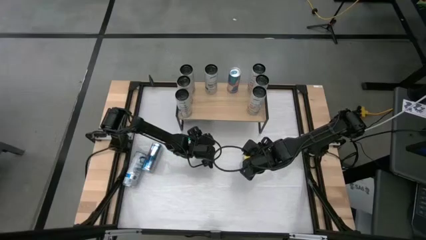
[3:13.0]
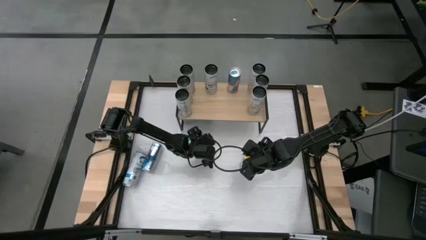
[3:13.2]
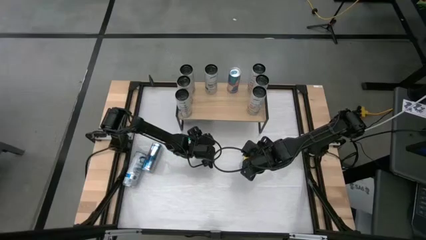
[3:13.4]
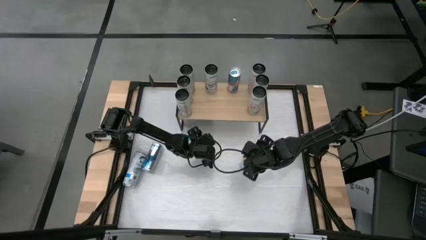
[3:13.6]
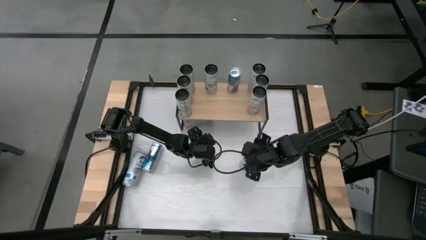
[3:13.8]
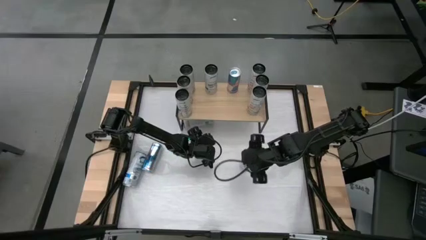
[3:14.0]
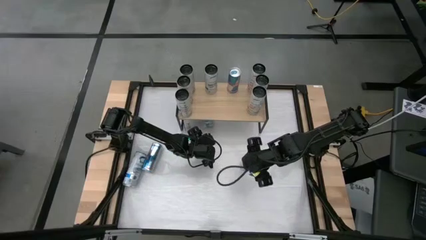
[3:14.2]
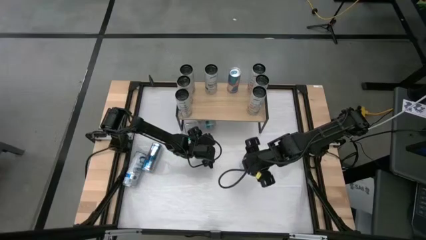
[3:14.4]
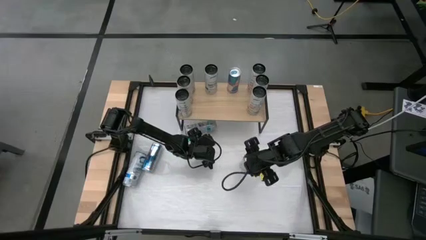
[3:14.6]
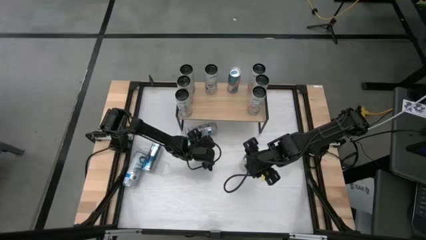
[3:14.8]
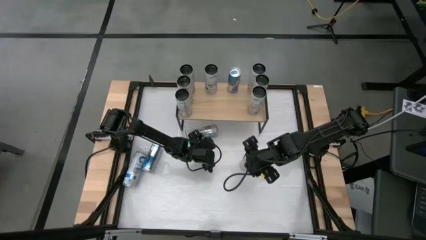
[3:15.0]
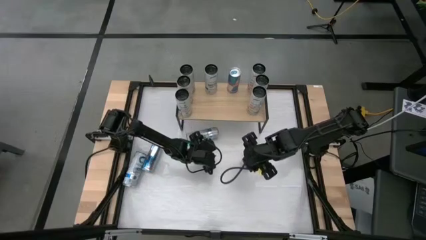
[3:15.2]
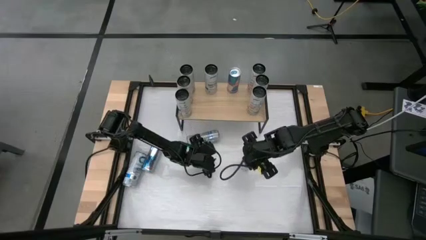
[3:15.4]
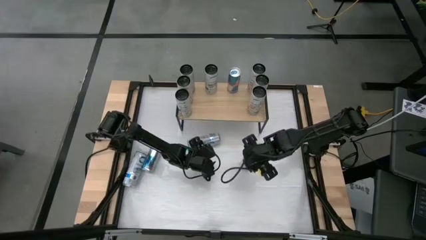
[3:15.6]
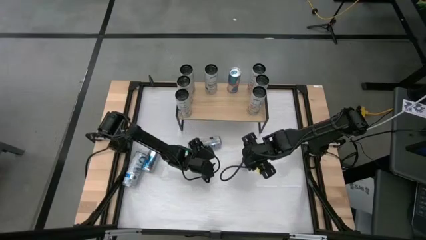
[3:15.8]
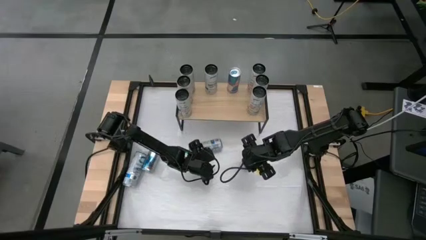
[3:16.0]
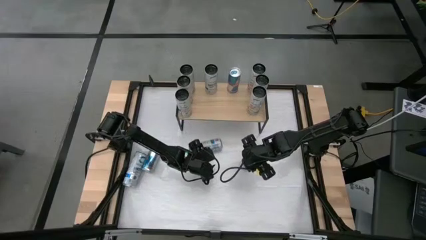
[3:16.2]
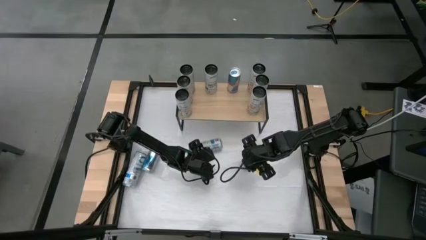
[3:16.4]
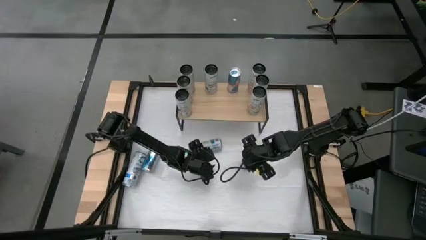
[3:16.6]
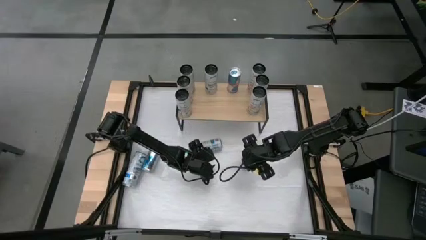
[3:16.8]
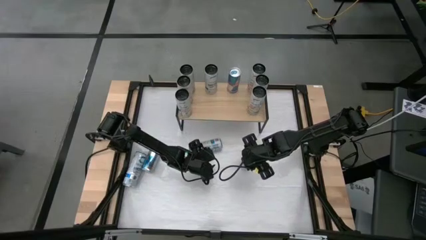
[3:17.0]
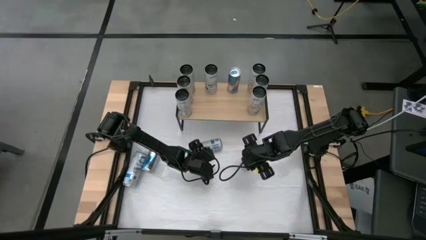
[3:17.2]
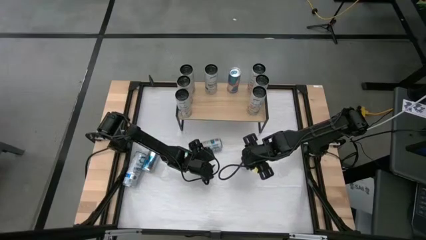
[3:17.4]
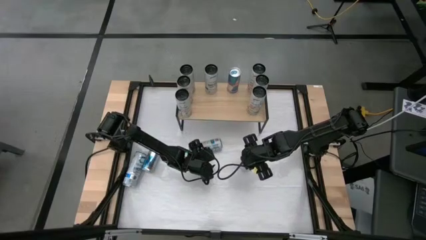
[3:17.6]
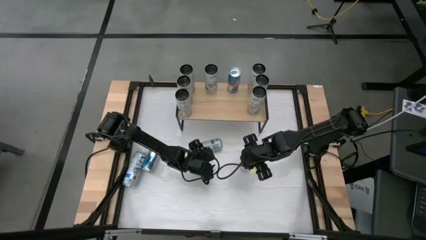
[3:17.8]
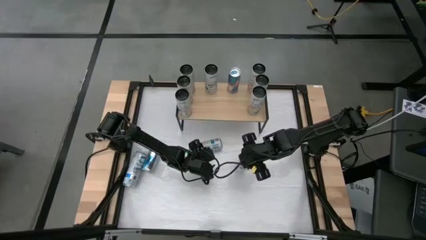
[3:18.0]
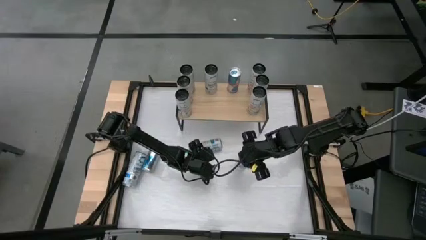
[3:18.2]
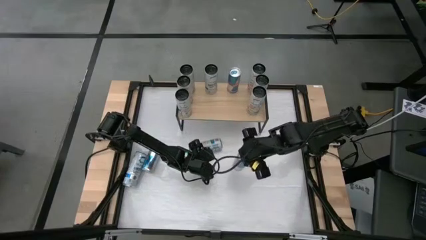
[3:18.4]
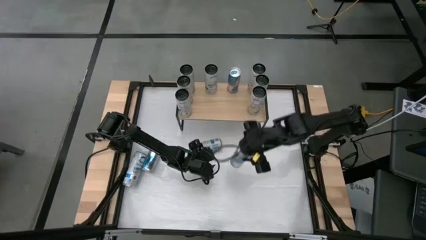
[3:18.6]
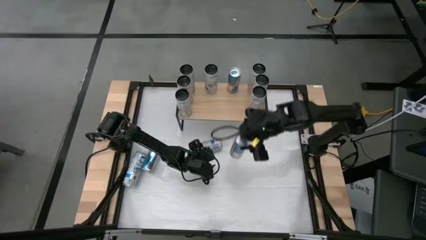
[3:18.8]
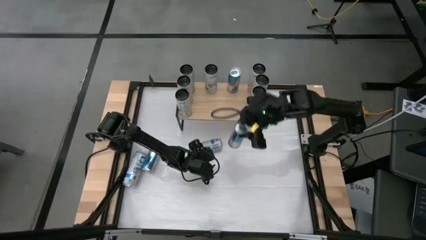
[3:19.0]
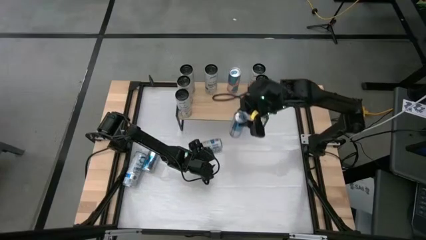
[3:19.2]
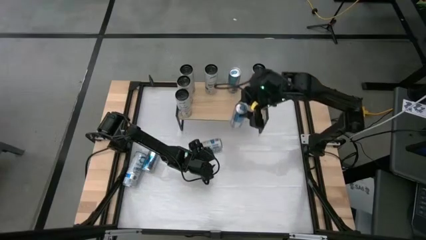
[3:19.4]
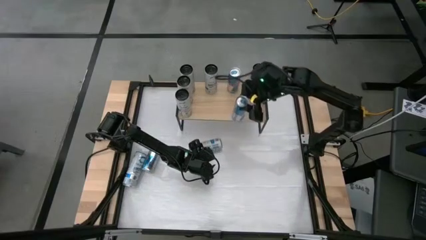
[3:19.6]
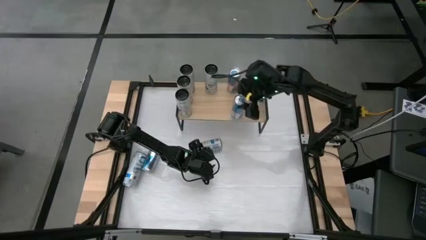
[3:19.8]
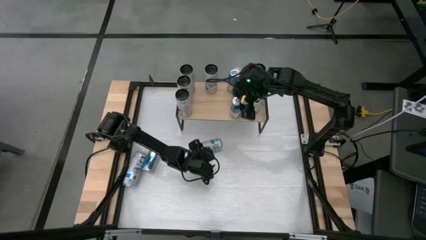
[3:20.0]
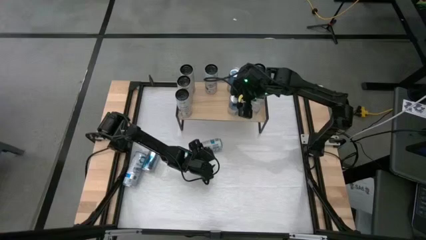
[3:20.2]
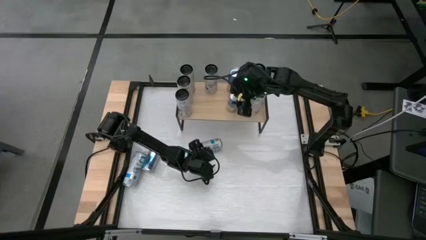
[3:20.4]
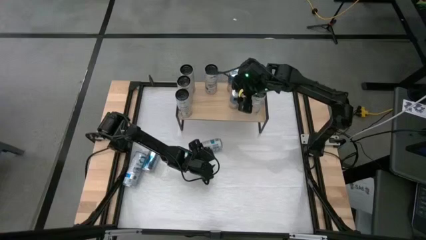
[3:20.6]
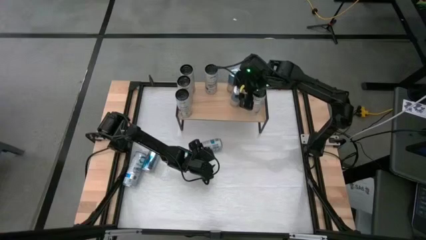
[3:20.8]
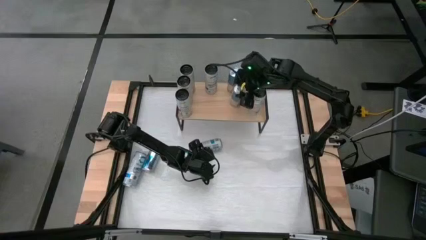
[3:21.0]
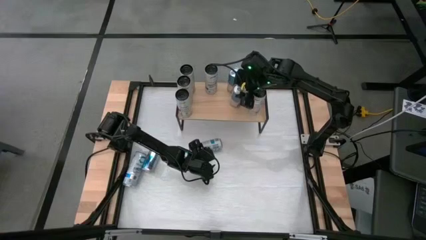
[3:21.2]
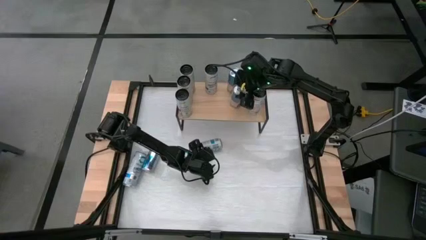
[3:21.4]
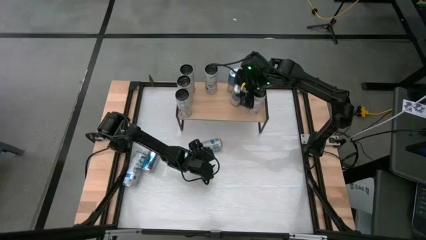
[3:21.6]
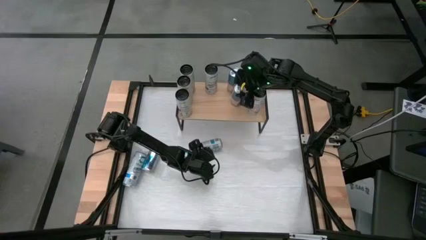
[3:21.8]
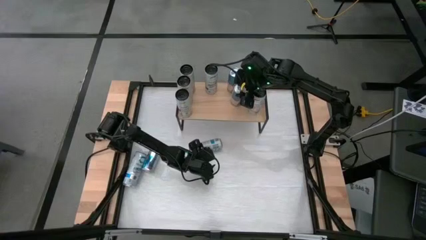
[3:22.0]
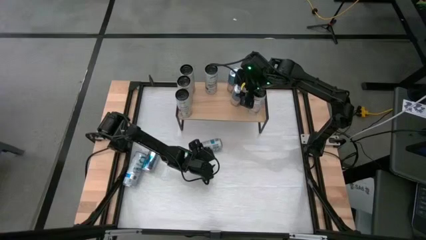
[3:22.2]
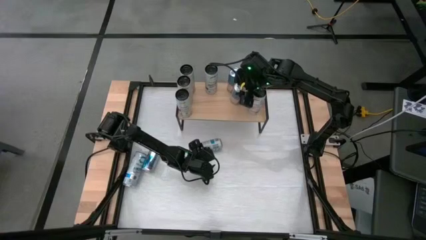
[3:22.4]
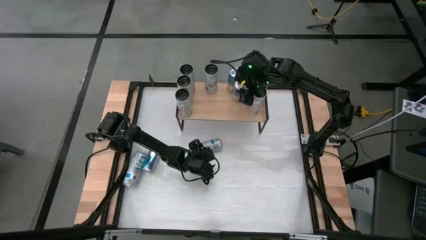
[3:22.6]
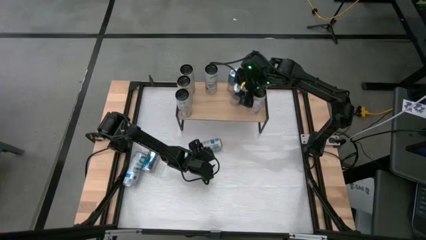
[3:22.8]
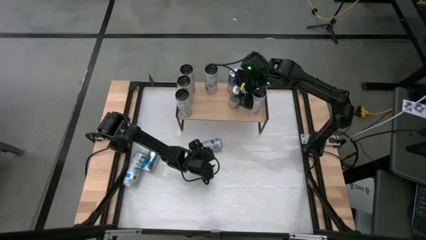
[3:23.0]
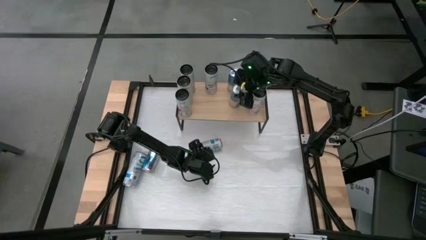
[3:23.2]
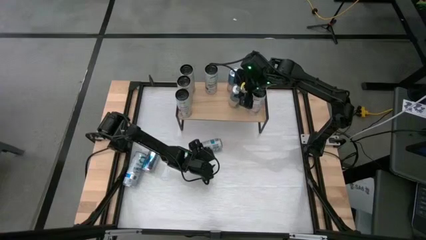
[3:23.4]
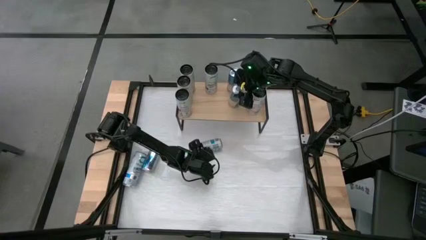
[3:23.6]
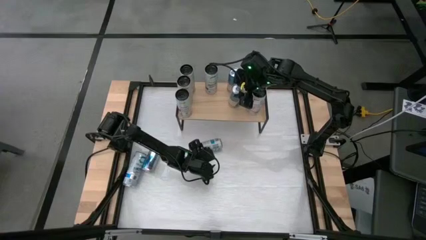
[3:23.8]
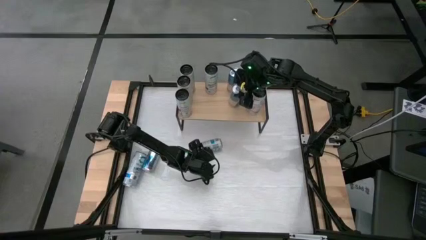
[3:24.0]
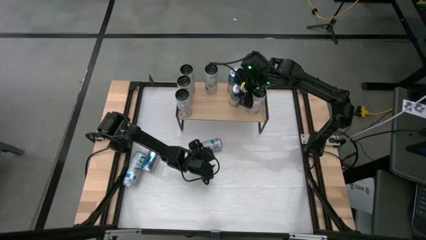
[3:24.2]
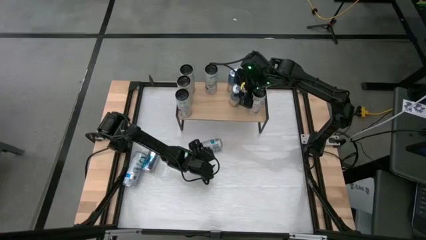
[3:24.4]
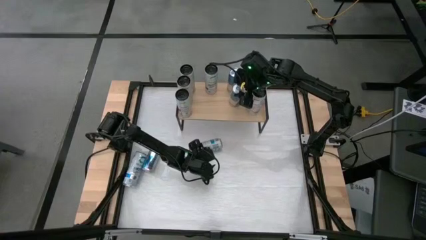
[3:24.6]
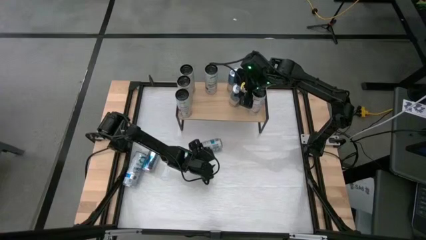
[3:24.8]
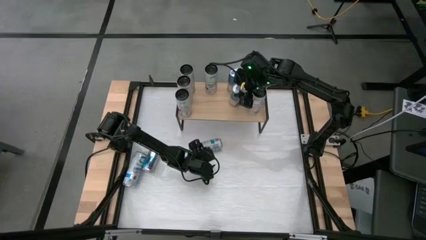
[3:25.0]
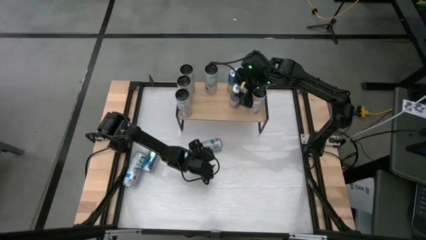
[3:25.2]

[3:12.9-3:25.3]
Task: Sort soda cans
Put the right blue soda can on the shelf and align with other blue soda cans

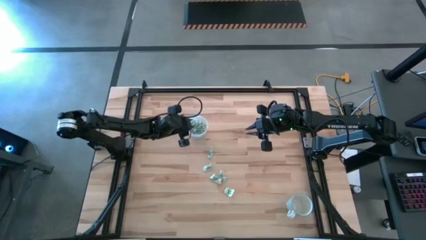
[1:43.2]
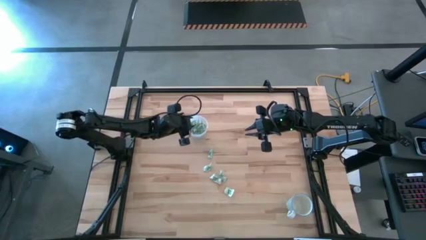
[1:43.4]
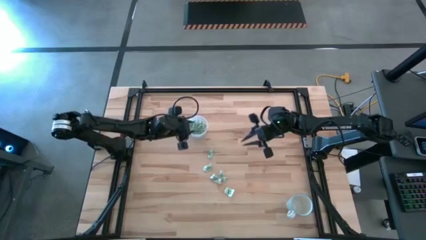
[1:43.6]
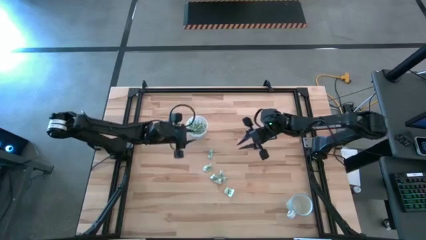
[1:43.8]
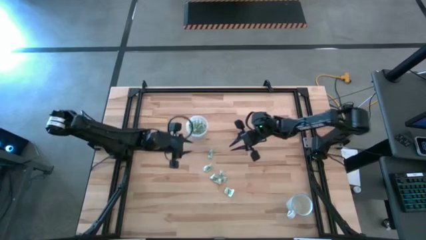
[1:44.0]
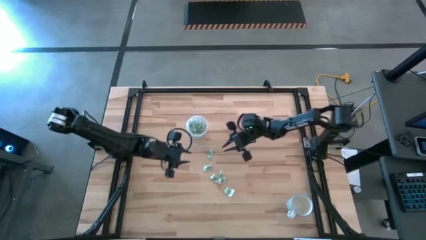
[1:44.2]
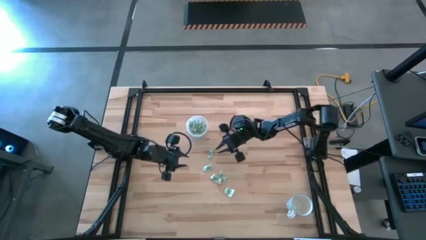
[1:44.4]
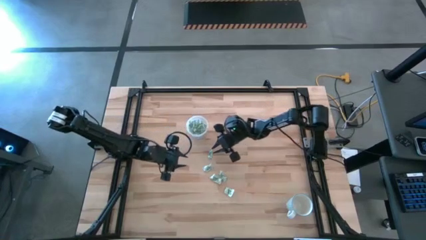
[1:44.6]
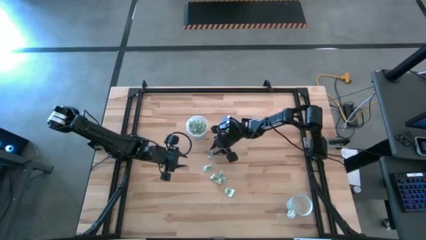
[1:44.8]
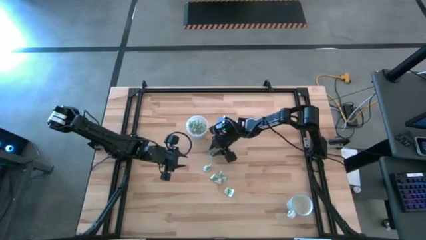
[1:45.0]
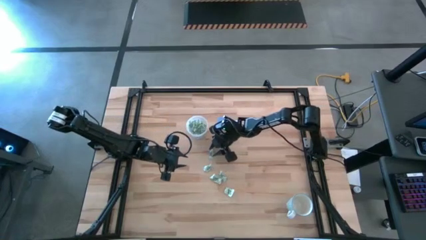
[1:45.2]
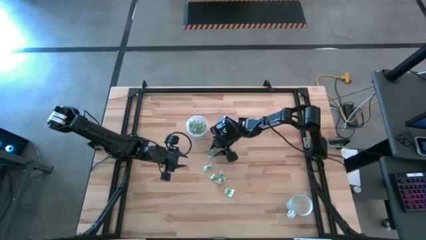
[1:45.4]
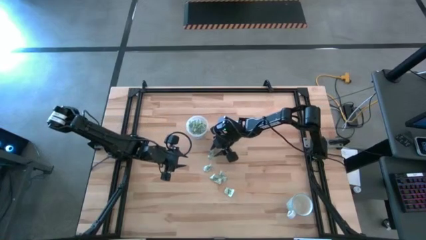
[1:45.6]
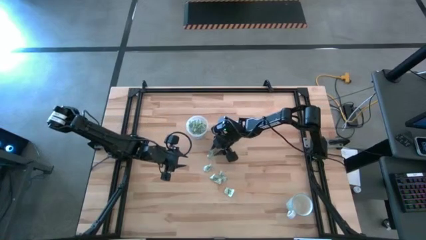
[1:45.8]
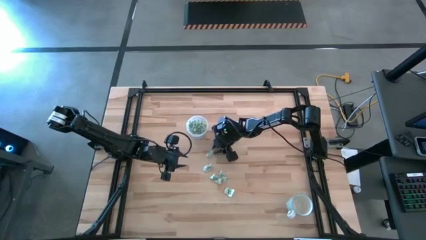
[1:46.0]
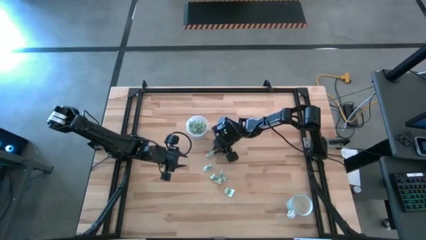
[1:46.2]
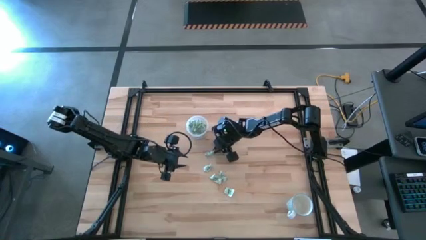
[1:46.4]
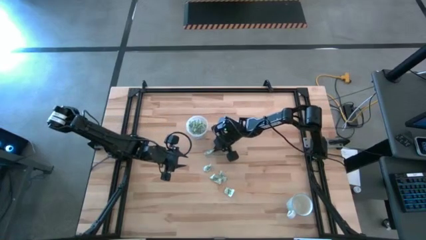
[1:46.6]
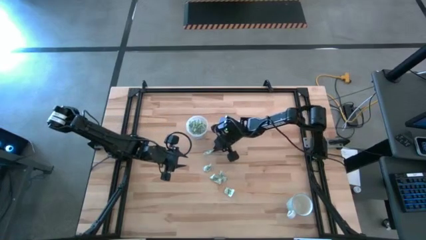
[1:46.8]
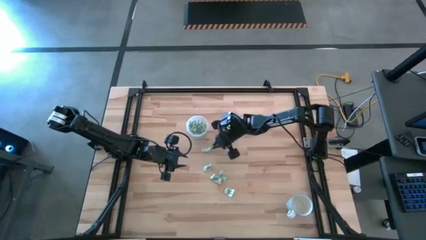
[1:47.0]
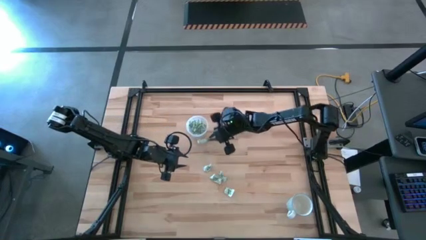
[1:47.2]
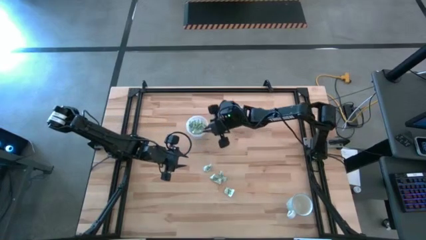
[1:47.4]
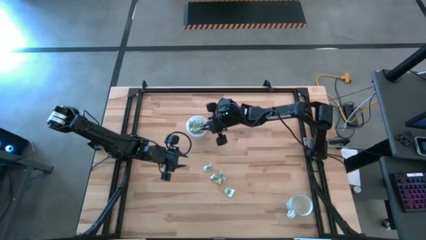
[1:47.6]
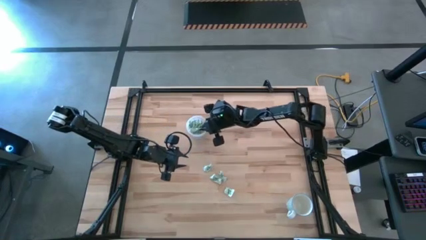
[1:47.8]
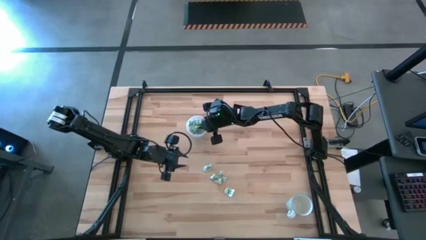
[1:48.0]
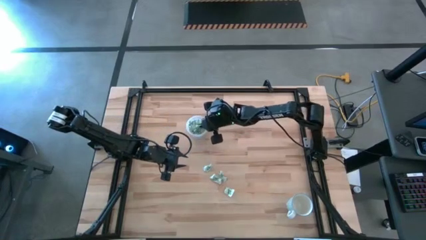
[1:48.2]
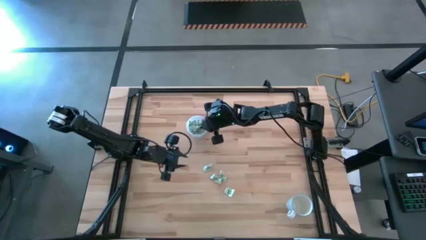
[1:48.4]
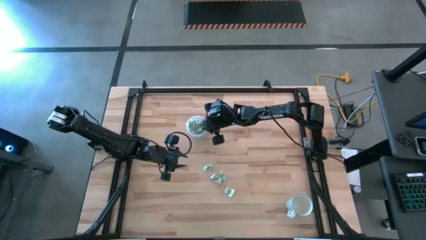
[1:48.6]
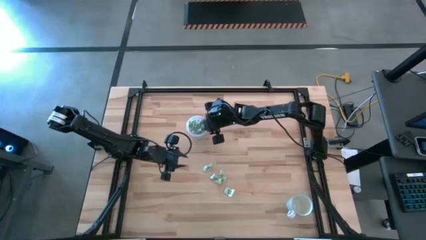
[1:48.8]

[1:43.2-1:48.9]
Task: Pick and place Stevia / Truvia into bins
Put the stevia packet into the transparent container
